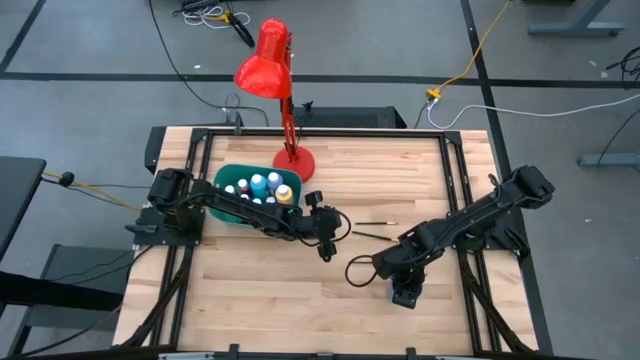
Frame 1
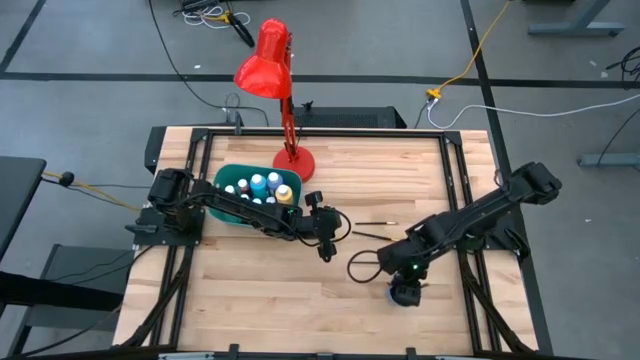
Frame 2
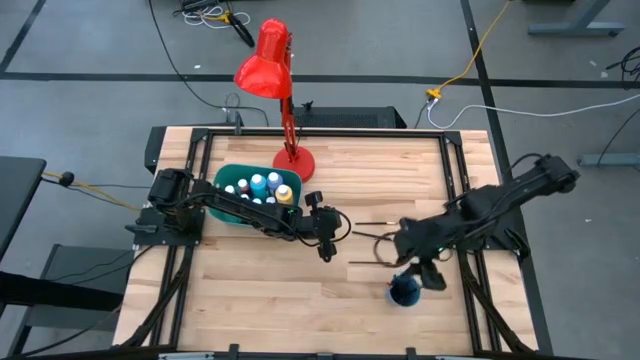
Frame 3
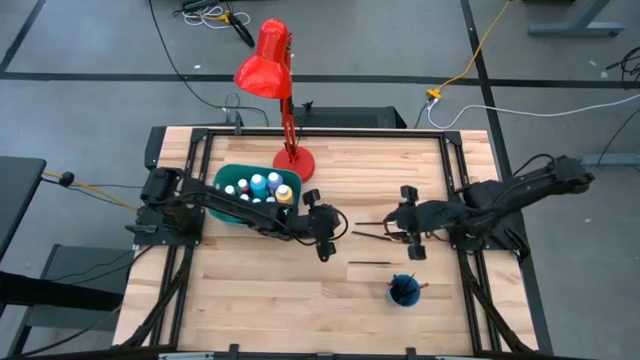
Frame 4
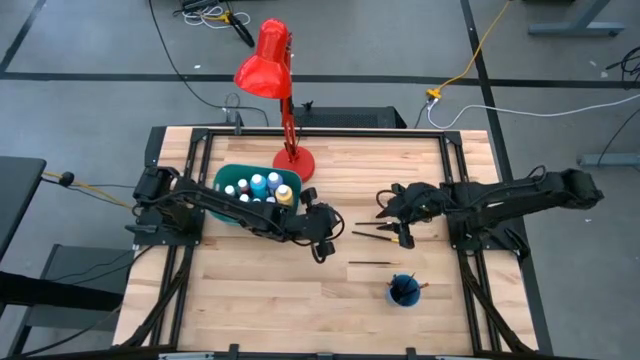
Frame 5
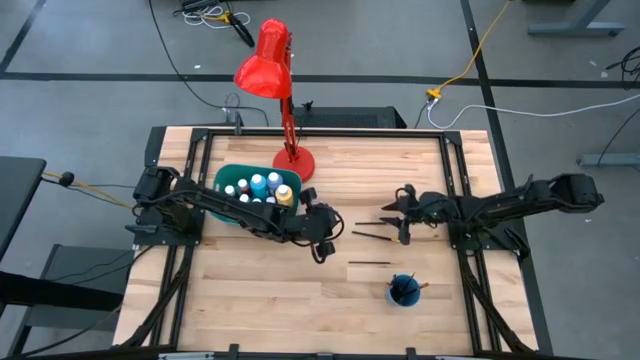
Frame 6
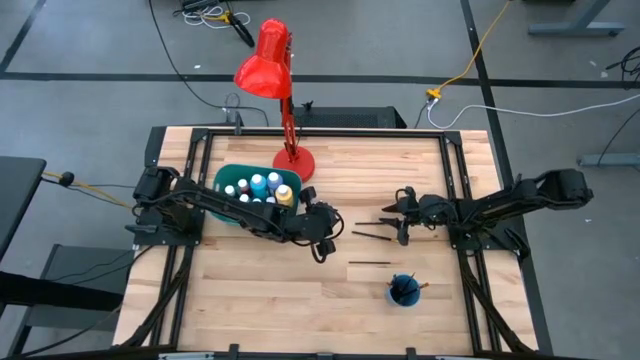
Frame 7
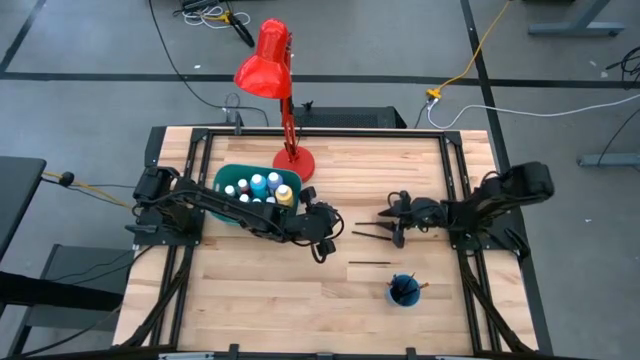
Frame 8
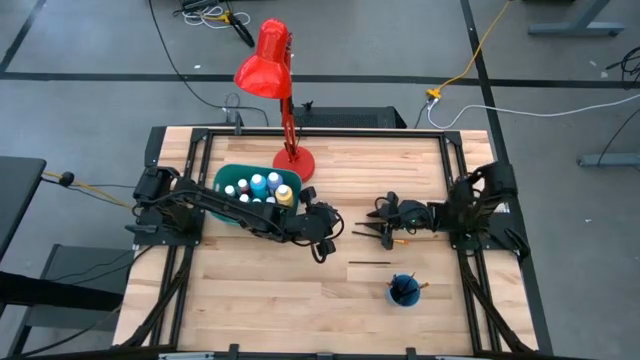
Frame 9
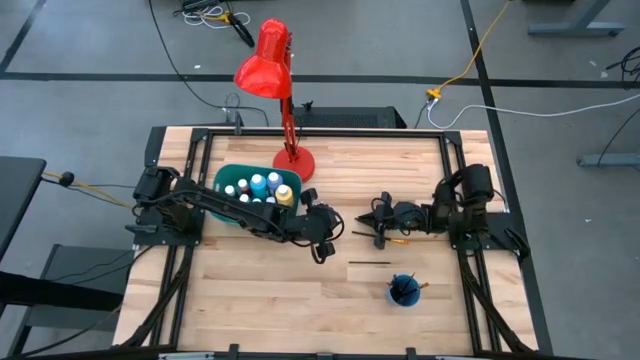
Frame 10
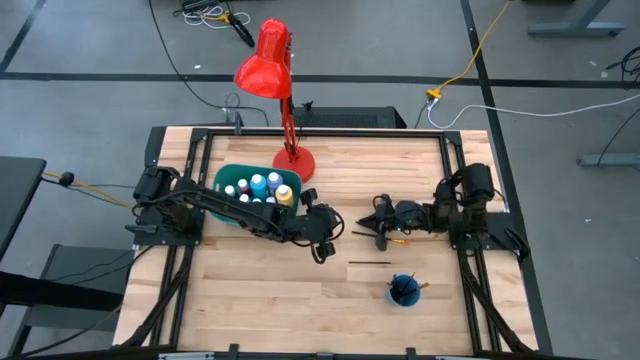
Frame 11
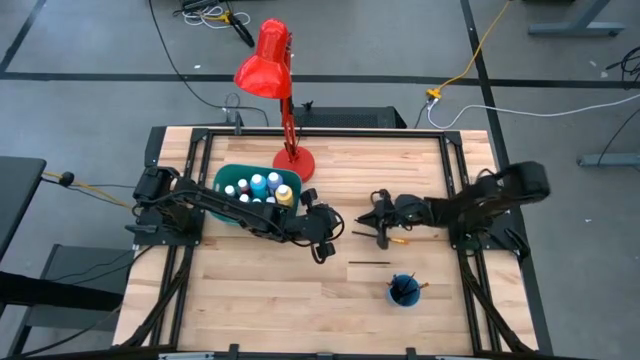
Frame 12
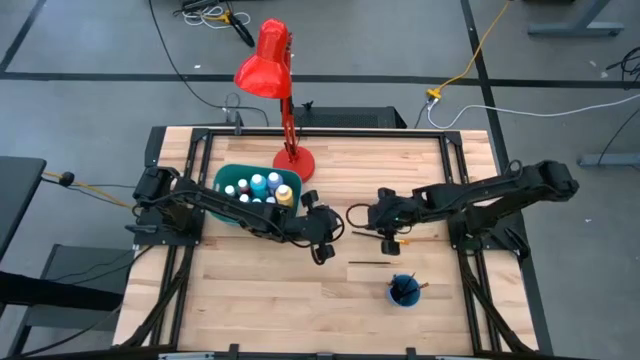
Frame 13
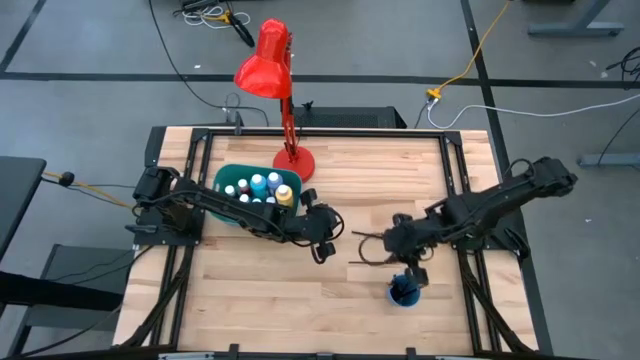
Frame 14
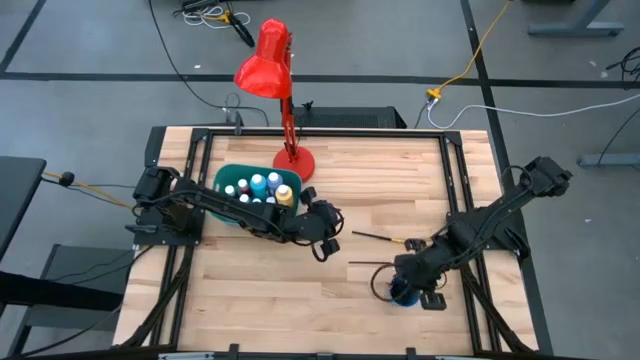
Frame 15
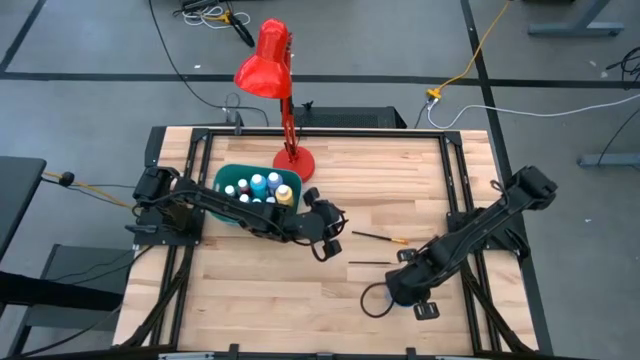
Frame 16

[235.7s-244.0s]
Task: Pick & Place Paint Supplies
Put the silver paint brush into the blue cup

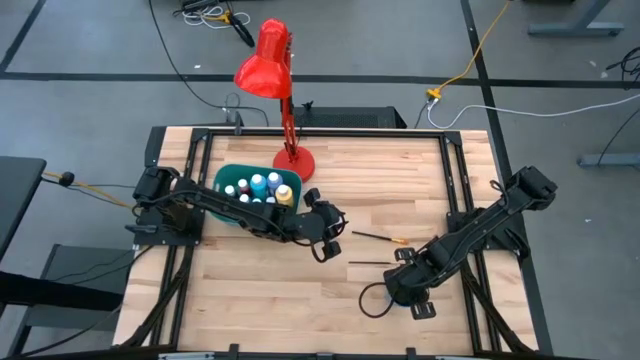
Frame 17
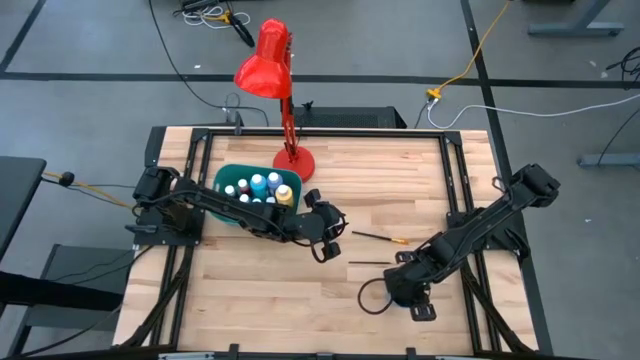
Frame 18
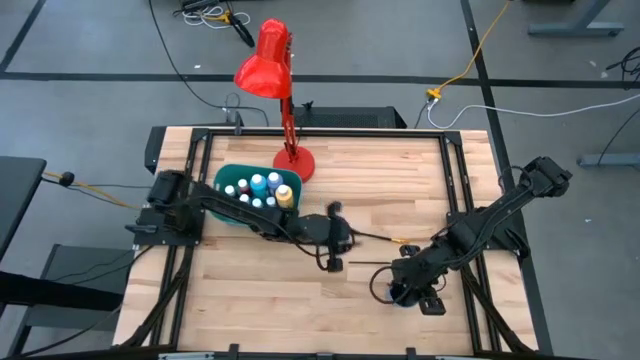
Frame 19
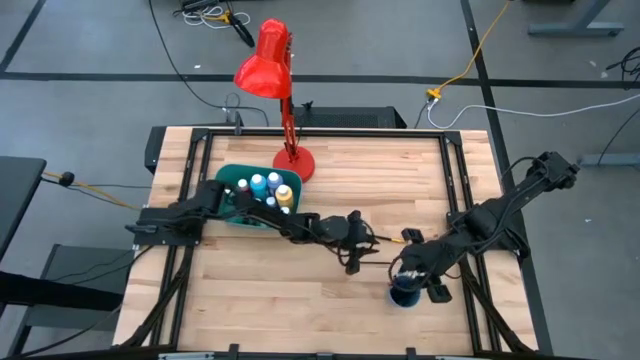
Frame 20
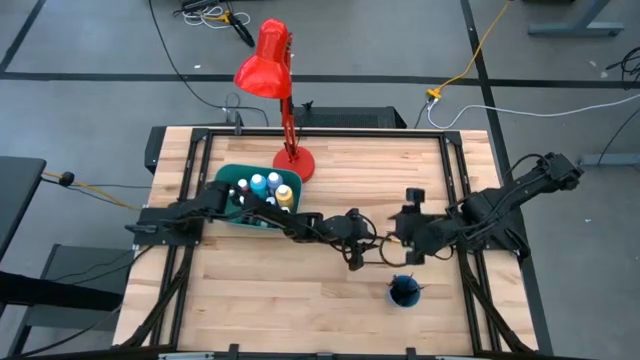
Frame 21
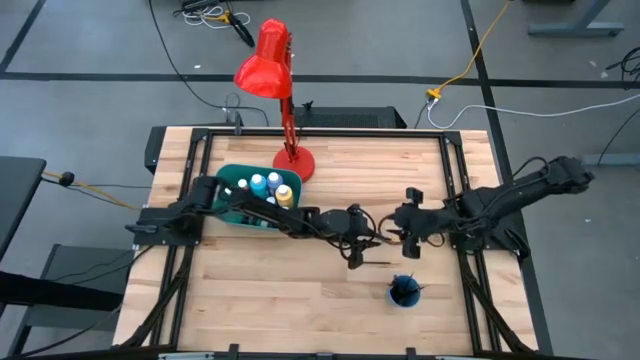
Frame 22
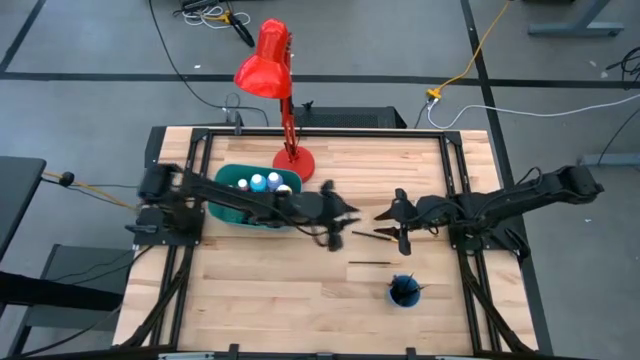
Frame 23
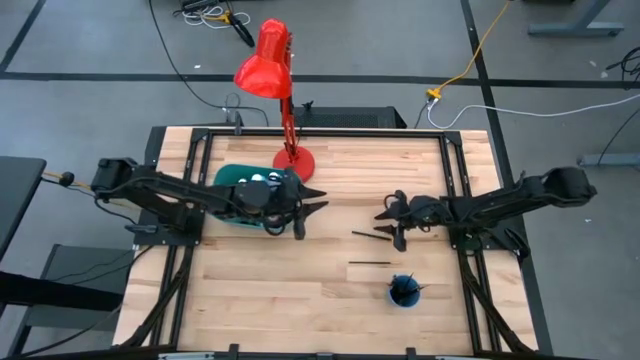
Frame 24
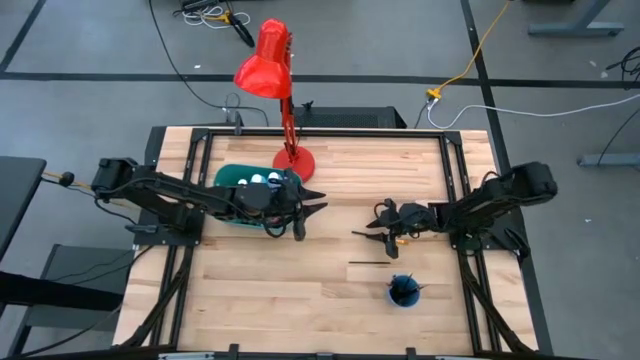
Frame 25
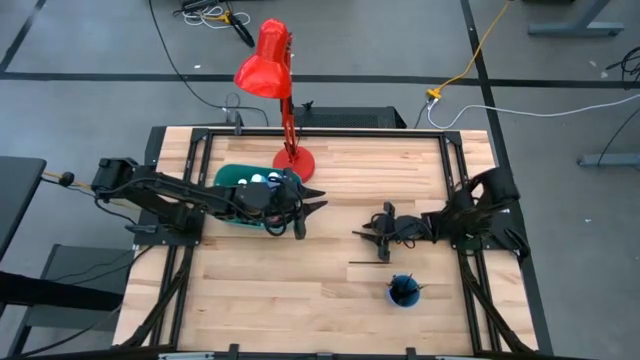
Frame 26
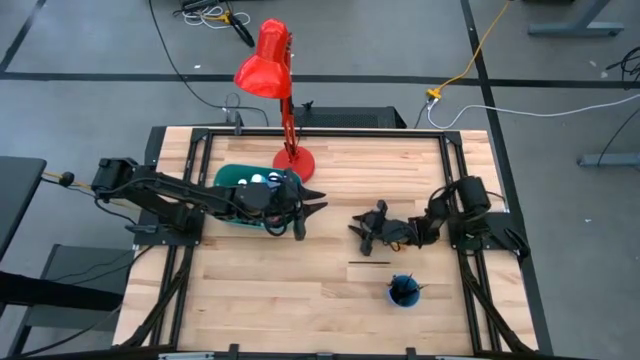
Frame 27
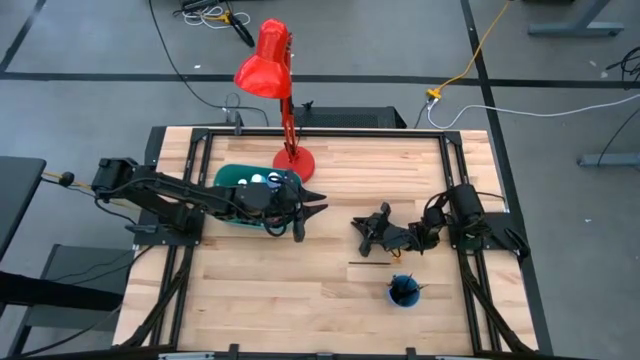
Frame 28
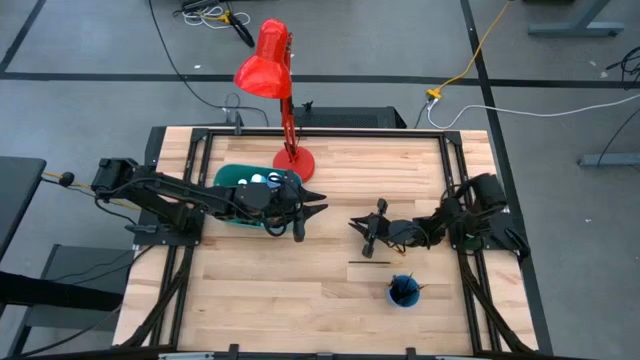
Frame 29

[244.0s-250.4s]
Put the gold paint brush into the blue cup

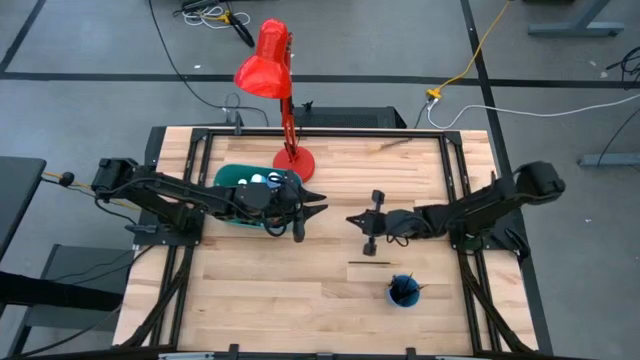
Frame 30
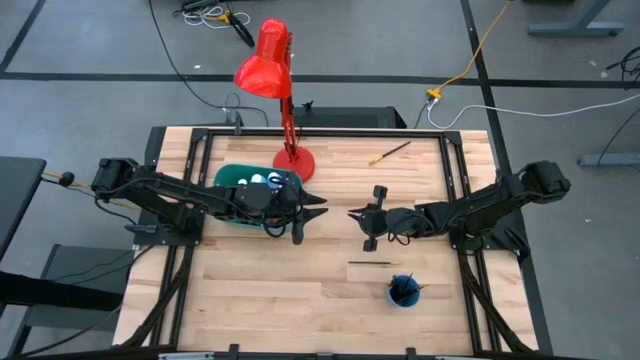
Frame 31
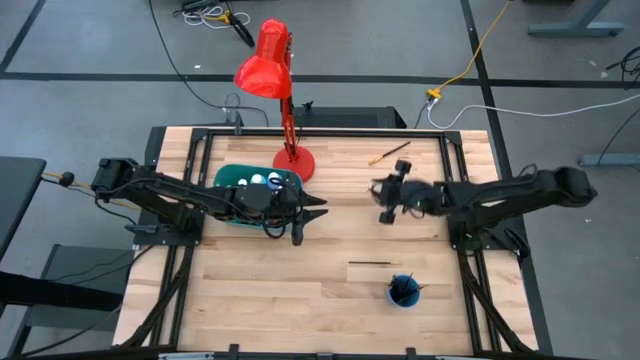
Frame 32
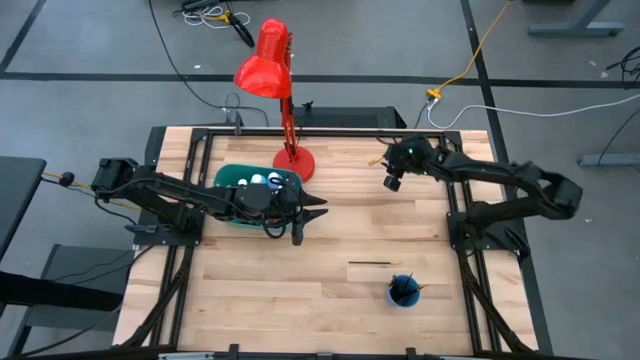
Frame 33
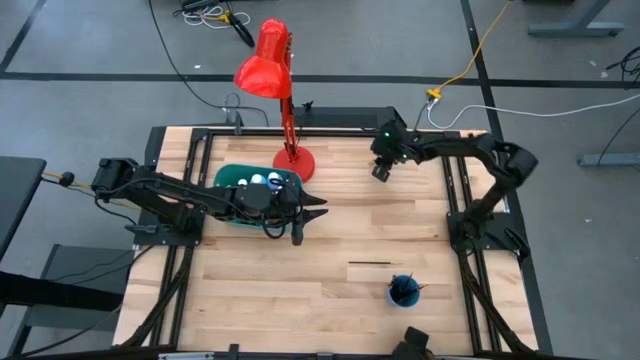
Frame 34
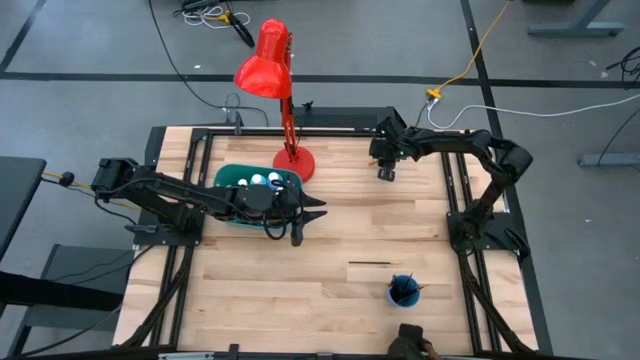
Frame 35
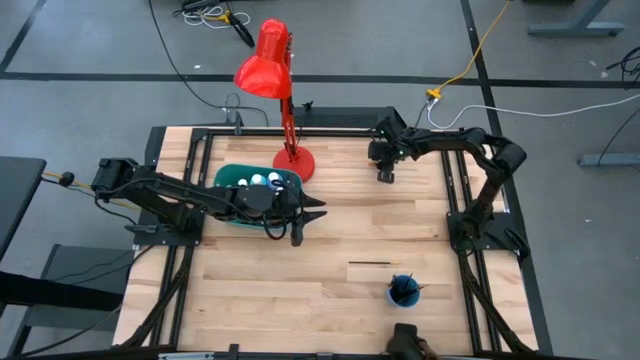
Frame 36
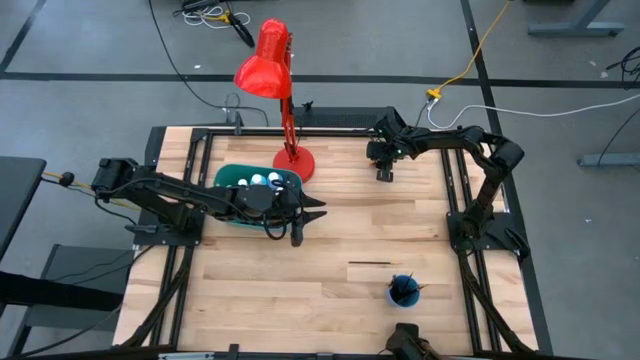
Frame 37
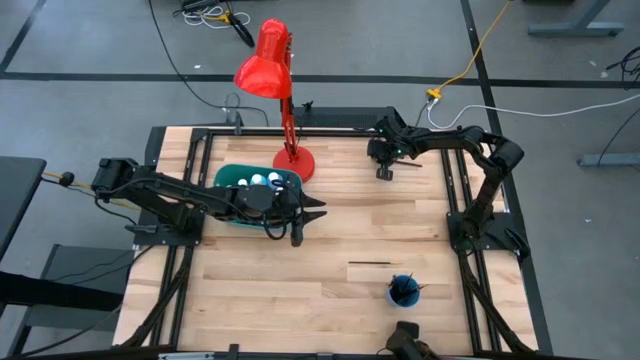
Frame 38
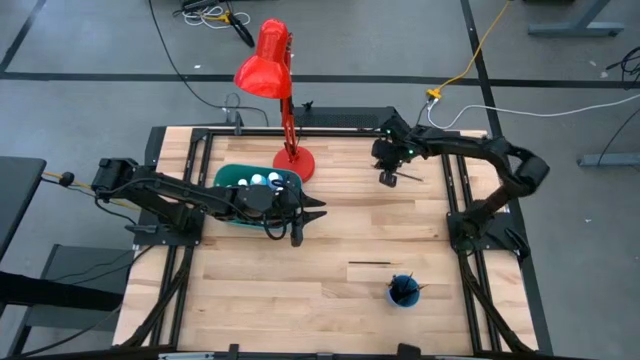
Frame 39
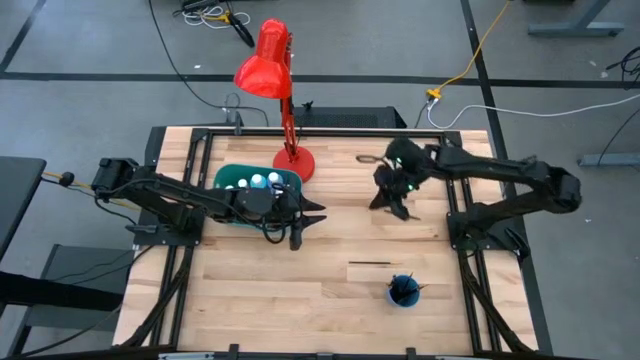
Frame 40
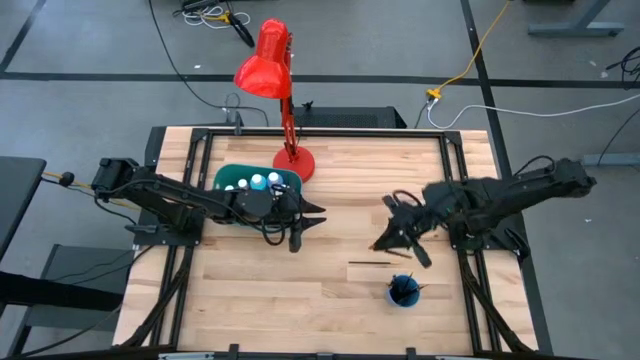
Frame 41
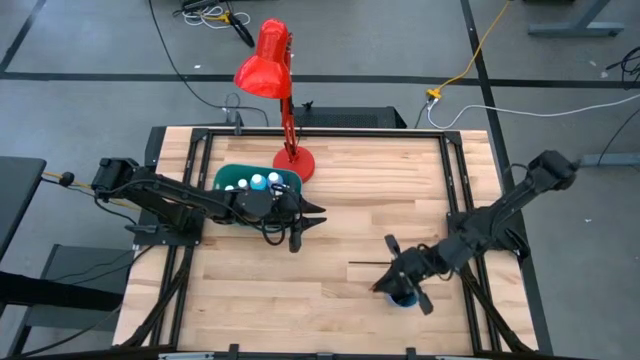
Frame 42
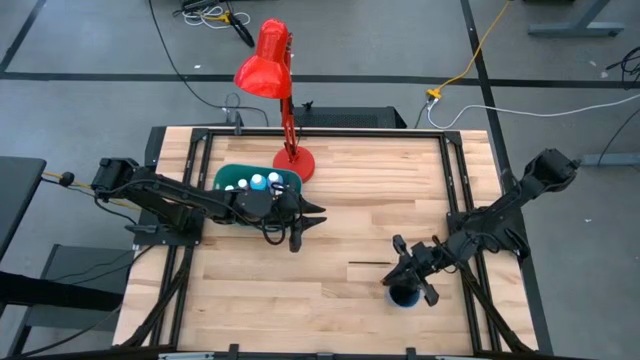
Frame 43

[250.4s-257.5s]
Put the gold paint brush into the blue cup
